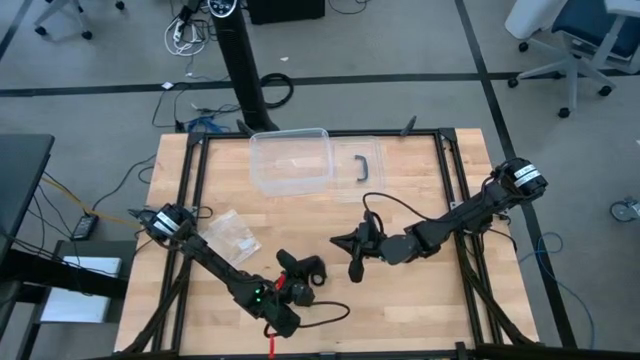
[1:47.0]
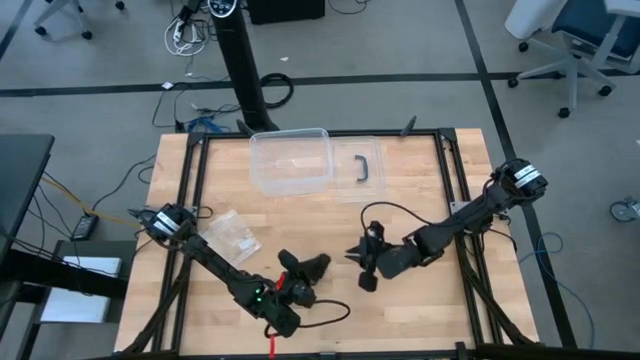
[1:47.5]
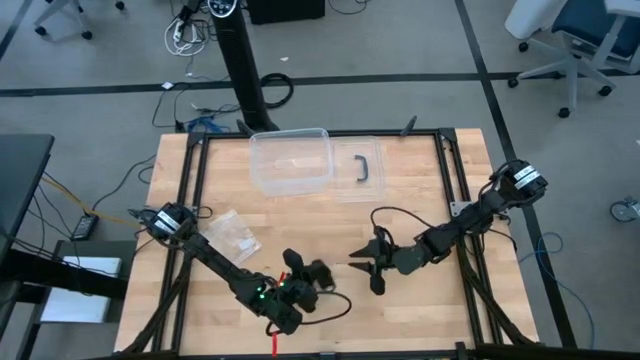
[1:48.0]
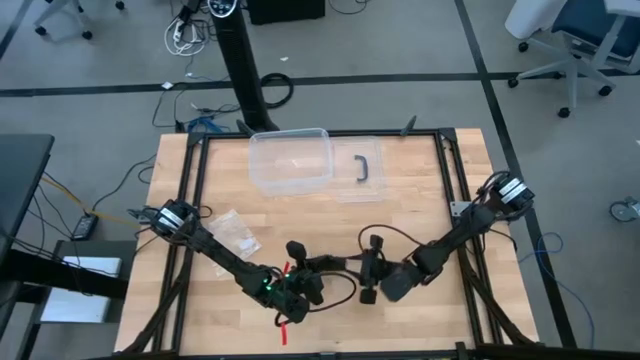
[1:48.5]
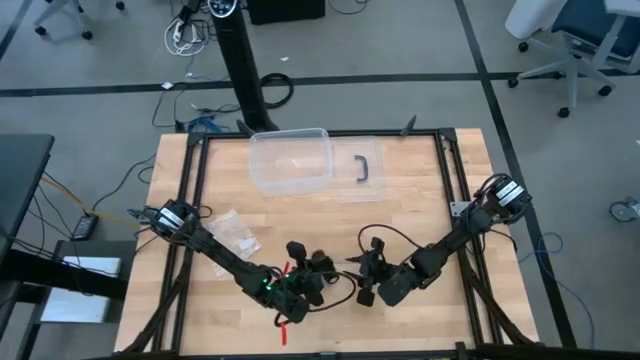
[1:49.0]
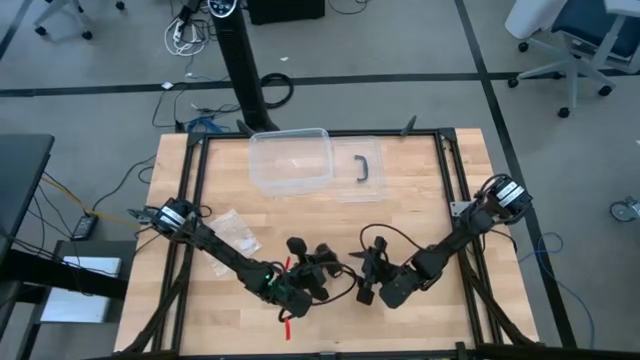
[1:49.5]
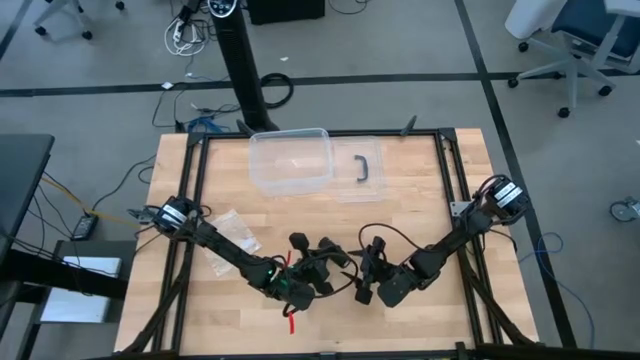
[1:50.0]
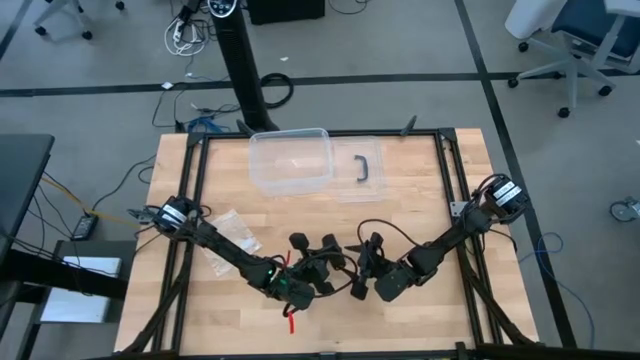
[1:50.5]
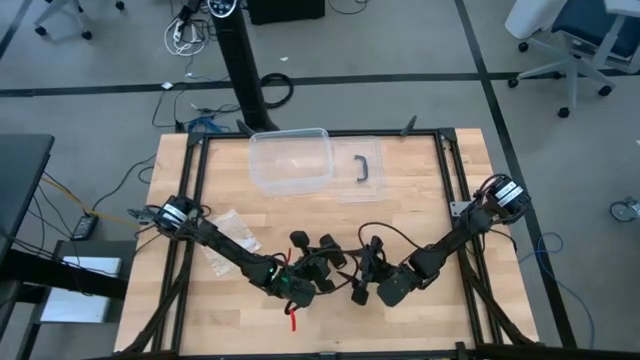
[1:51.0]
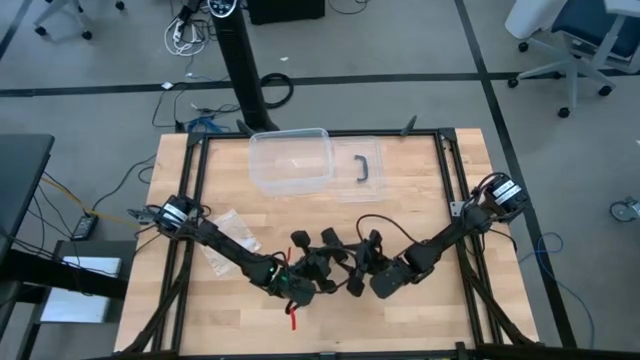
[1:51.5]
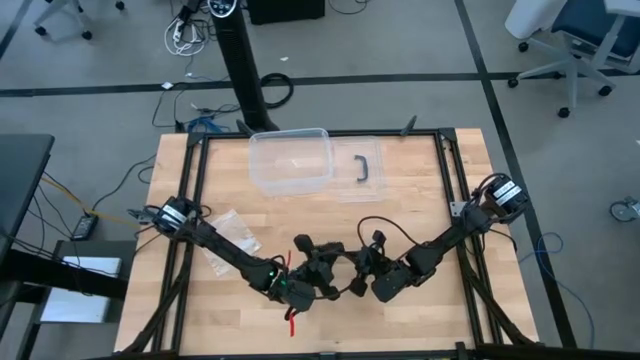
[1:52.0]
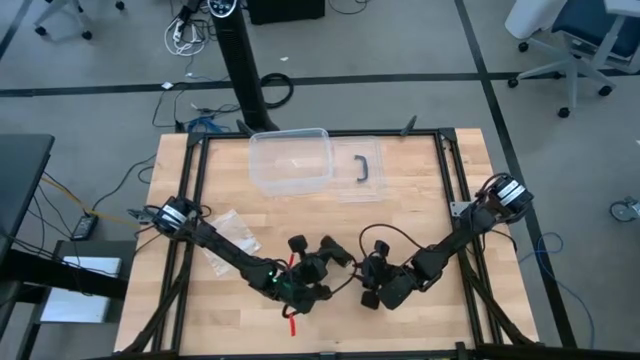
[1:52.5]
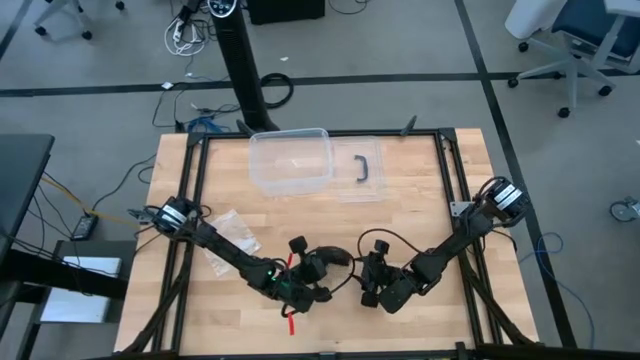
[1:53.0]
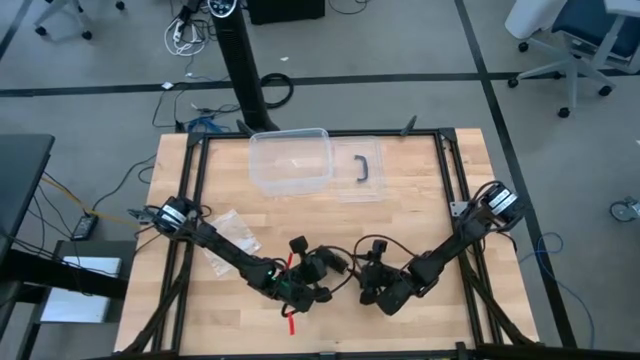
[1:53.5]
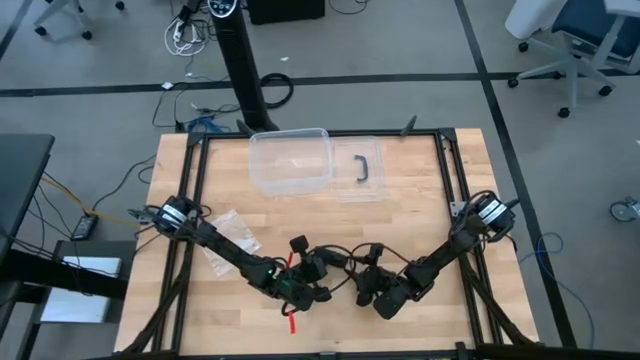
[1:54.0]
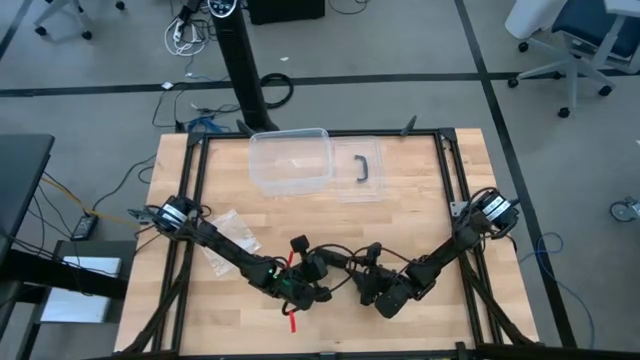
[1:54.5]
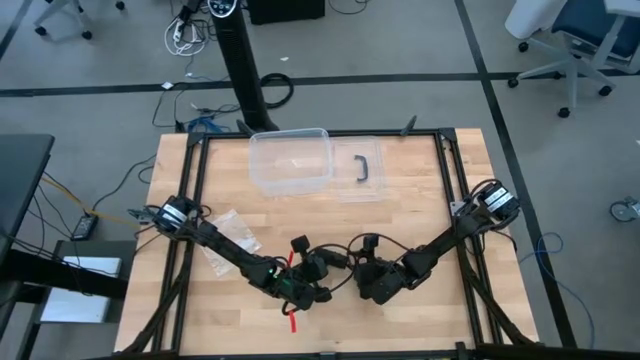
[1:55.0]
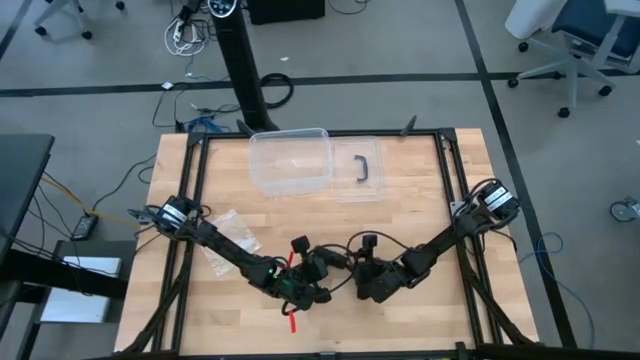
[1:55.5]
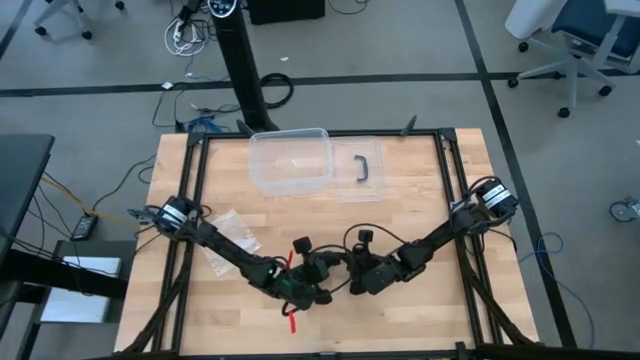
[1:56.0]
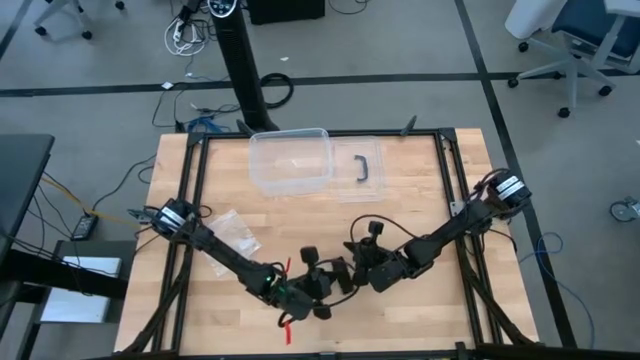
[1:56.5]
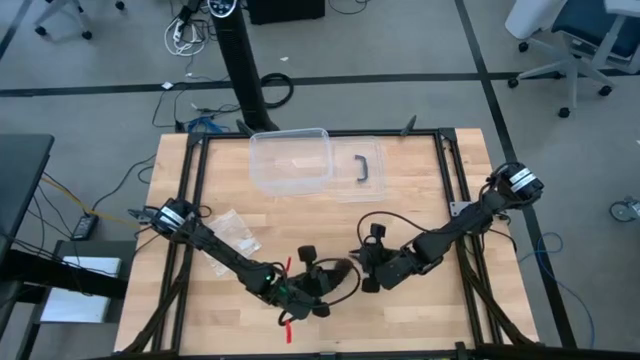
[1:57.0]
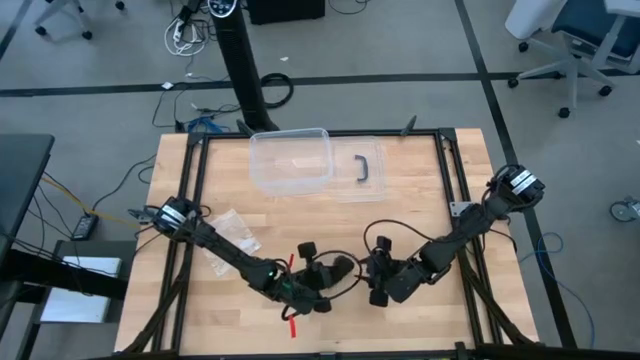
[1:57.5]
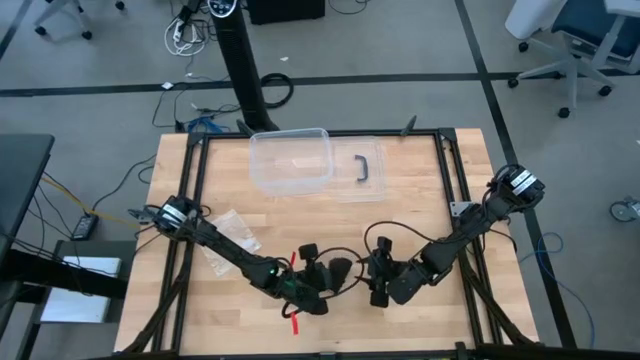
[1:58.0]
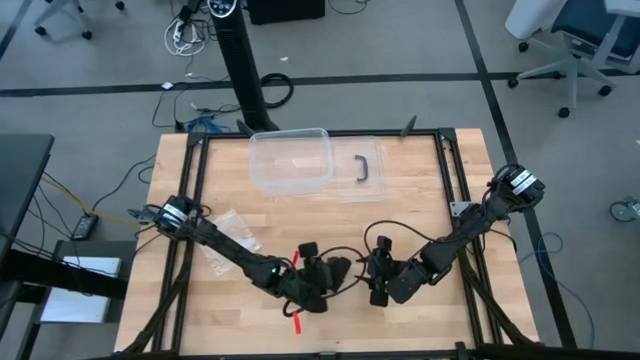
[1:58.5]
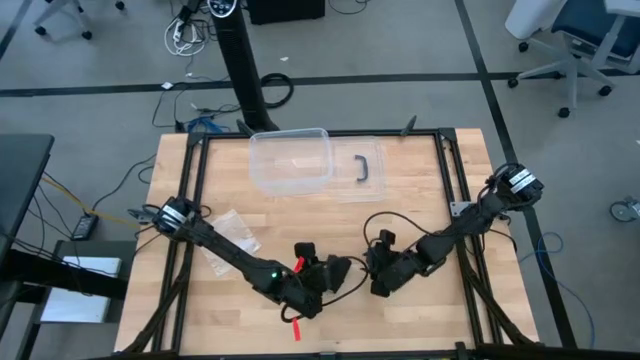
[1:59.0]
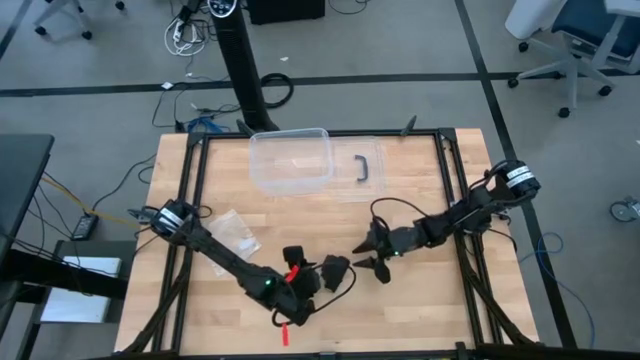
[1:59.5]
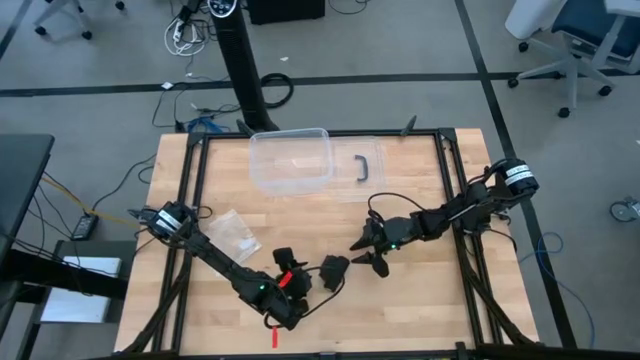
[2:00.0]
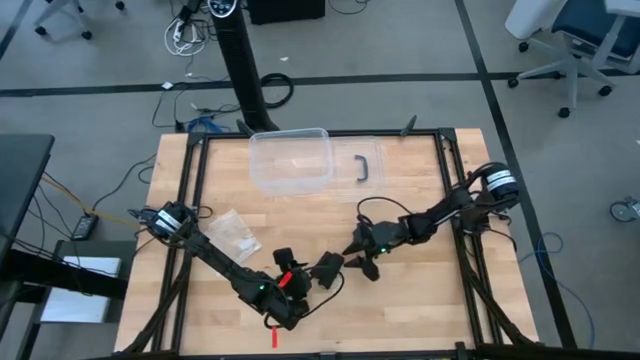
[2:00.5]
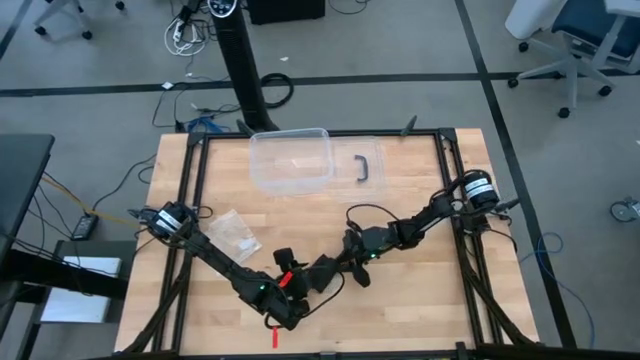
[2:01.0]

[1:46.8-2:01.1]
Task: Roll bandage
Roll the black bandage

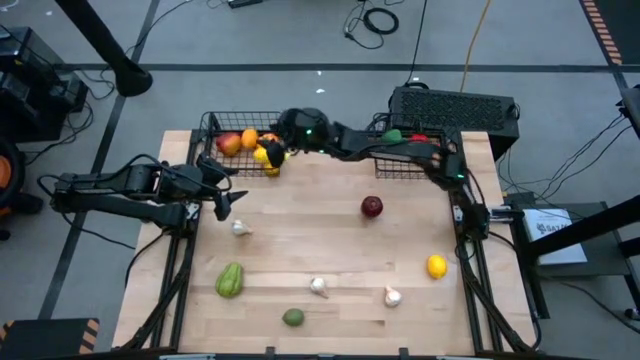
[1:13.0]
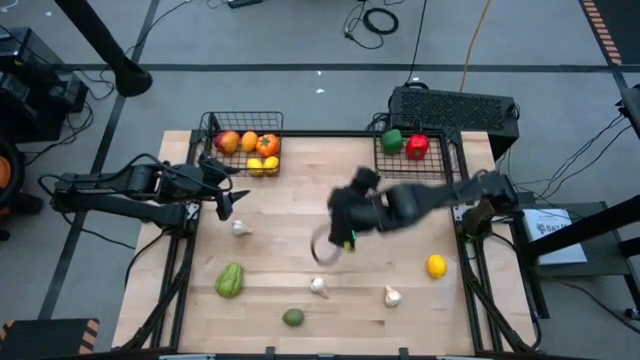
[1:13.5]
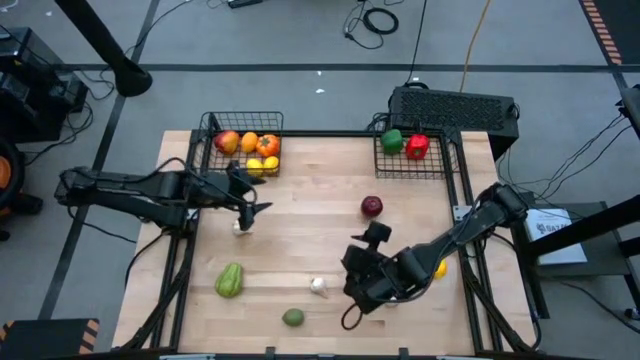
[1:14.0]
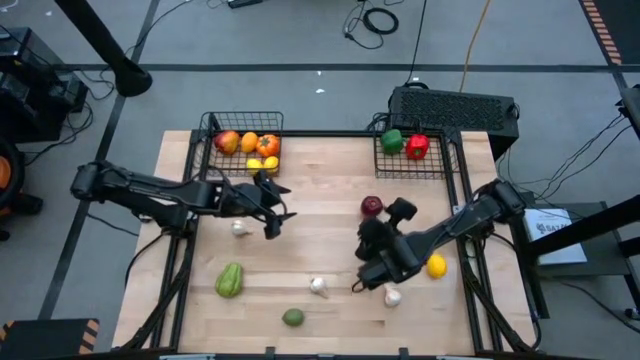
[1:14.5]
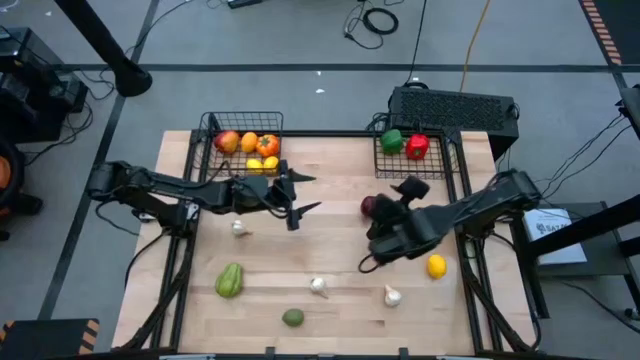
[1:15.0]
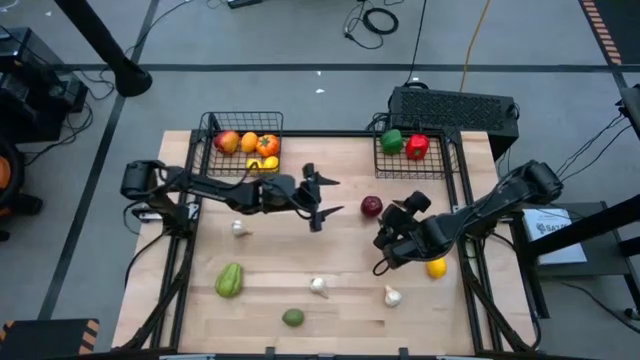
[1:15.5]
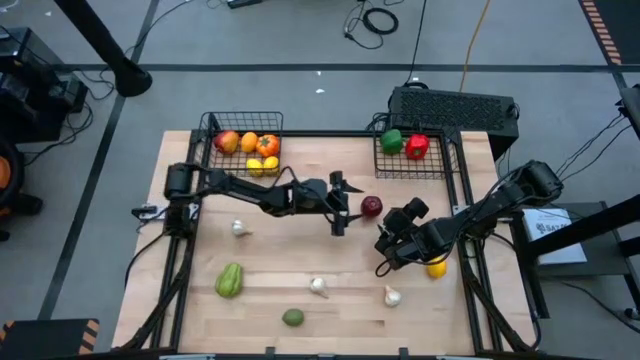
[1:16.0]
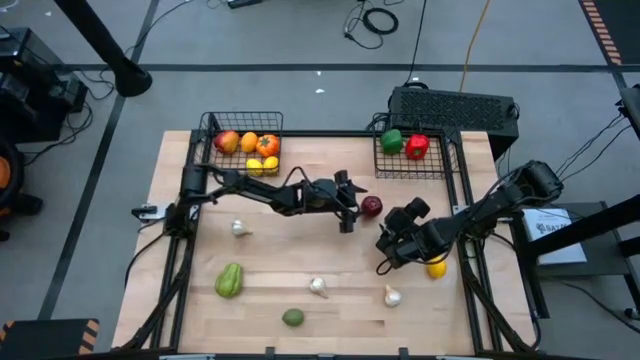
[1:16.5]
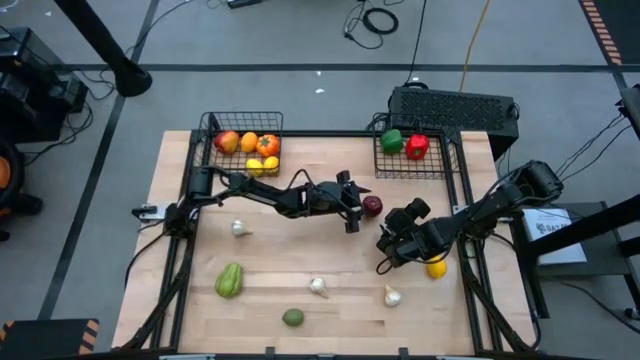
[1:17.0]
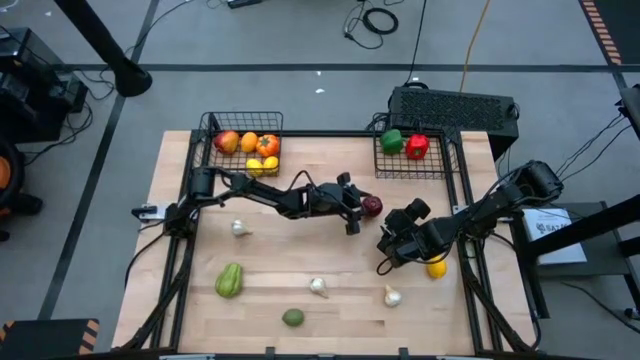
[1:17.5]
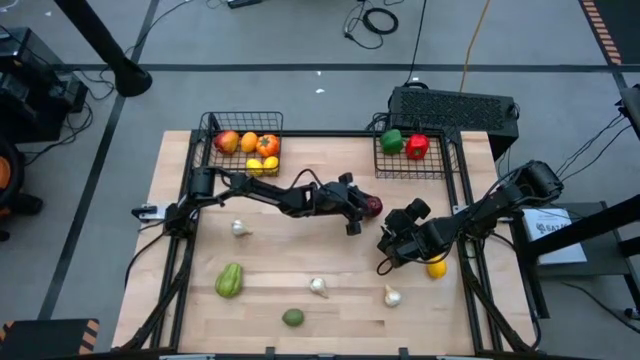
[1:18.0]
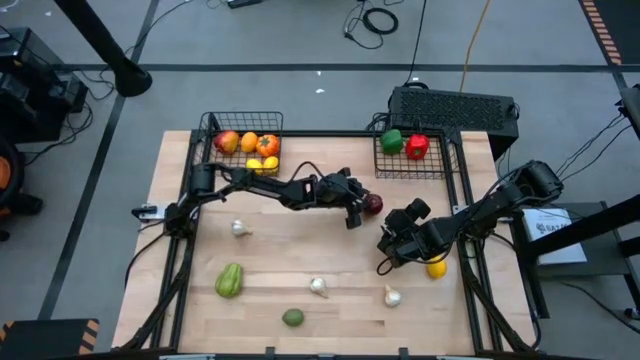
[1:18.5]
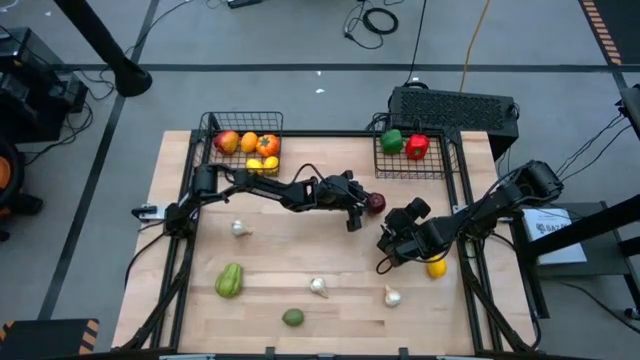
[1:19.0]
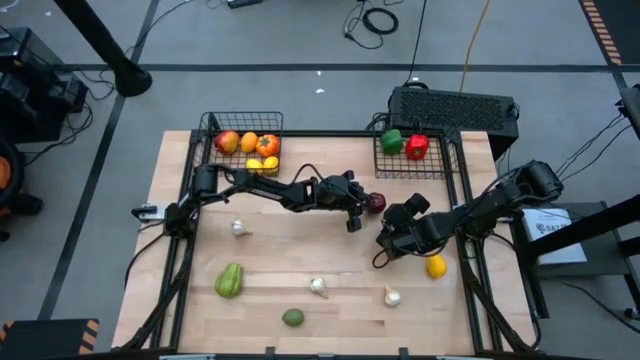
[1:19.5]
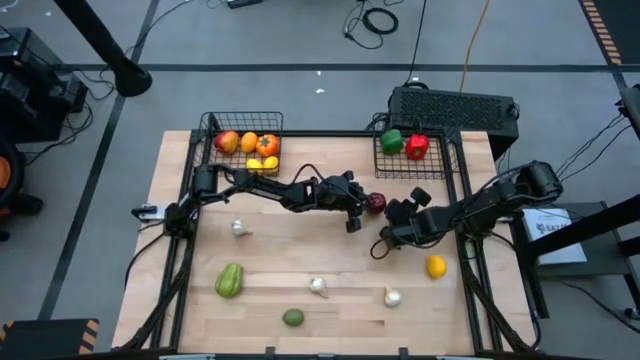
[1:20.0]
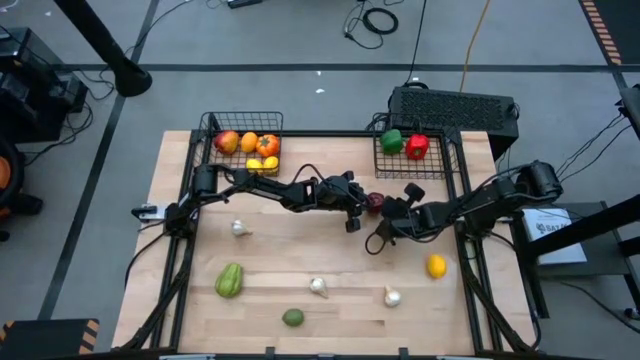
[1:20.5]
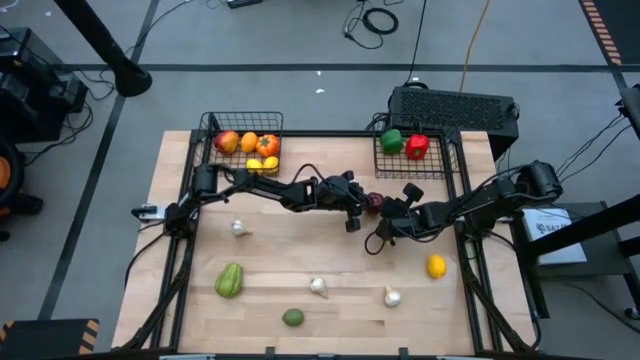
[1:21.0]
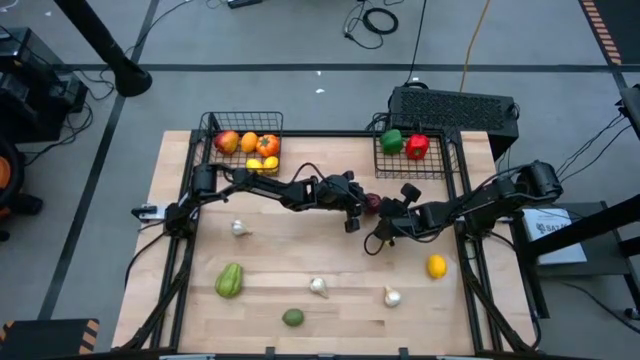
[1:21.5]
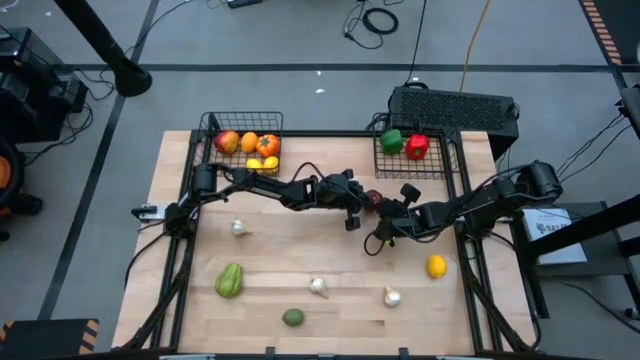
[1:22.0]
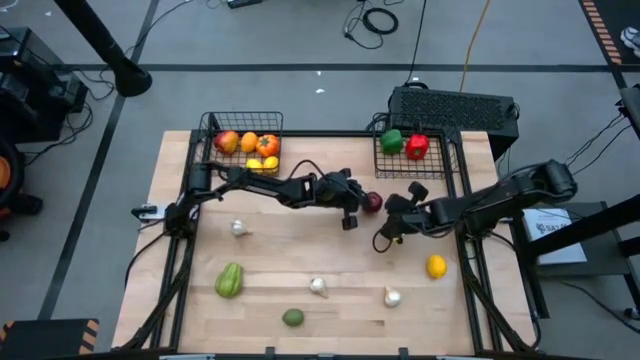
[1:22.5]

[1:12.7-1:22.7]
Task: Sort produce into baskets
Put the red apple in the left basket
